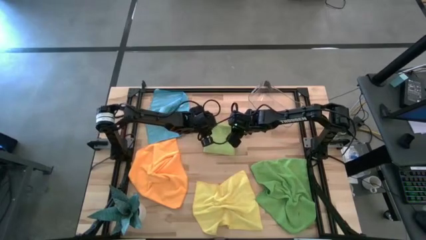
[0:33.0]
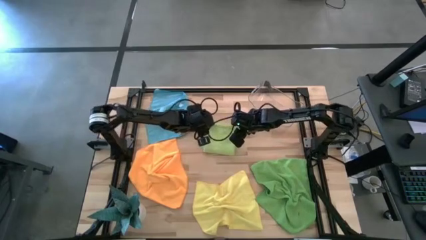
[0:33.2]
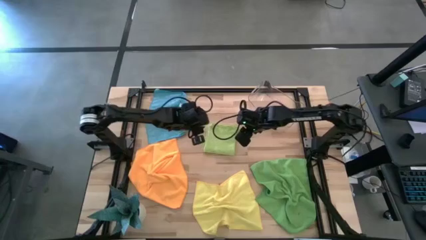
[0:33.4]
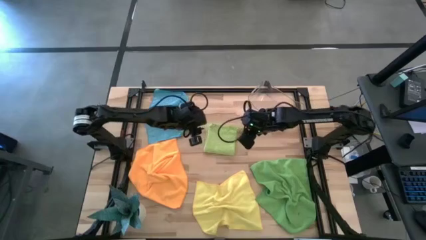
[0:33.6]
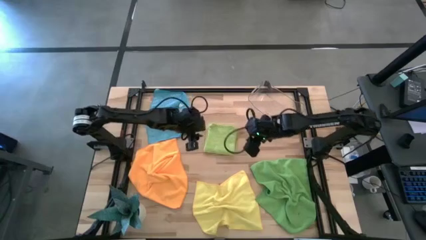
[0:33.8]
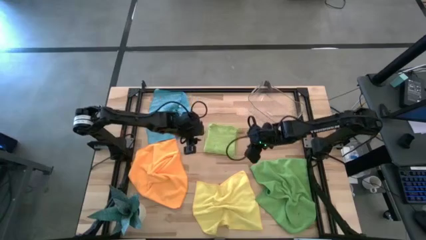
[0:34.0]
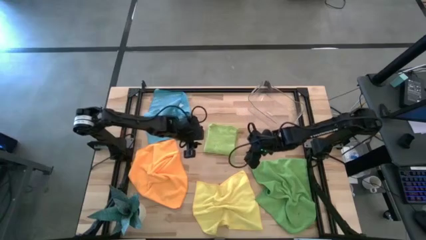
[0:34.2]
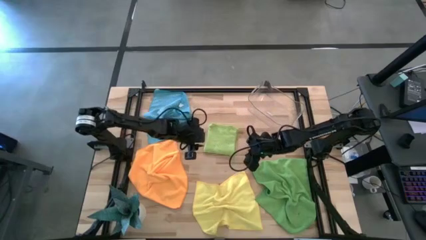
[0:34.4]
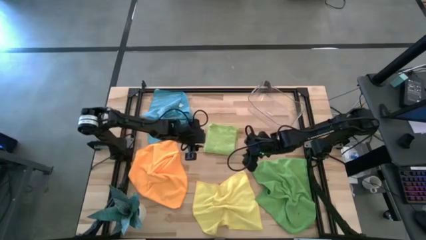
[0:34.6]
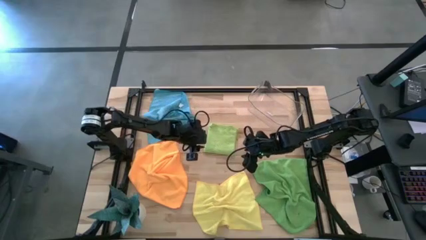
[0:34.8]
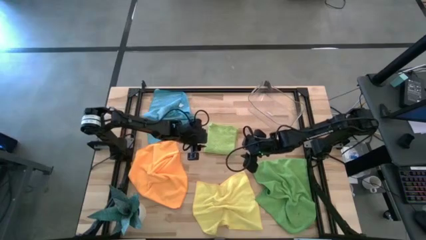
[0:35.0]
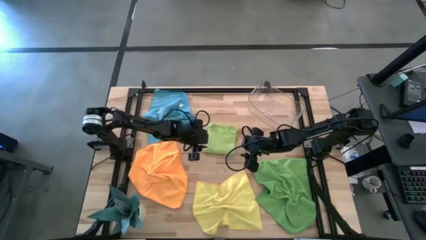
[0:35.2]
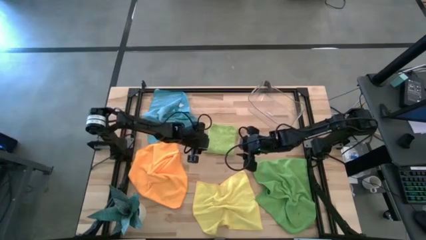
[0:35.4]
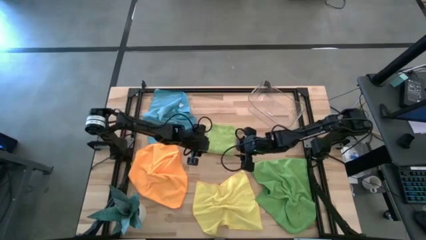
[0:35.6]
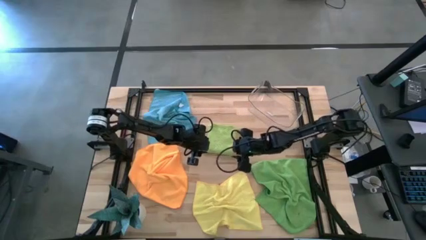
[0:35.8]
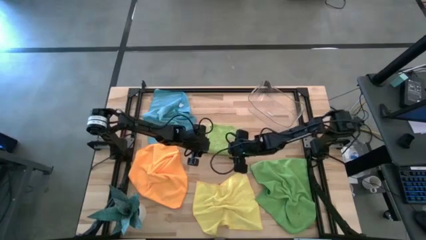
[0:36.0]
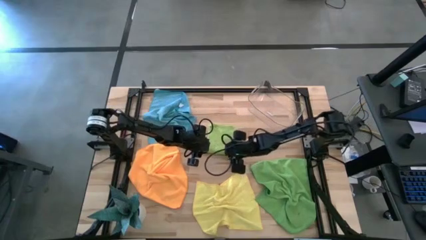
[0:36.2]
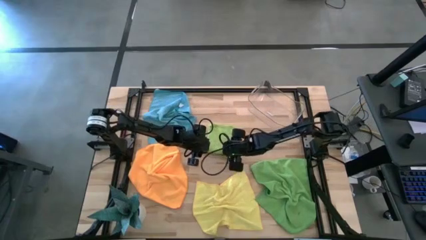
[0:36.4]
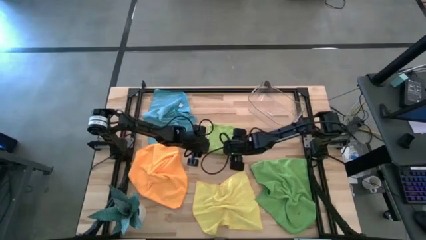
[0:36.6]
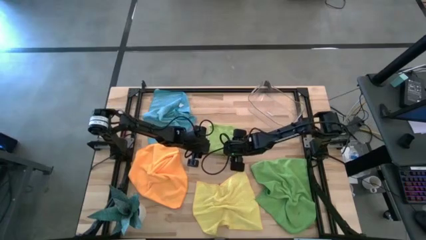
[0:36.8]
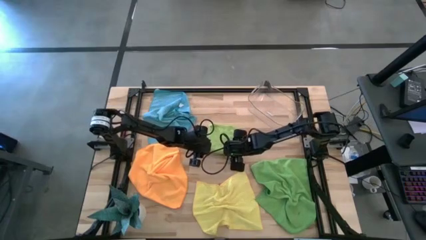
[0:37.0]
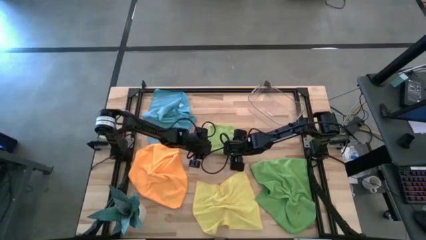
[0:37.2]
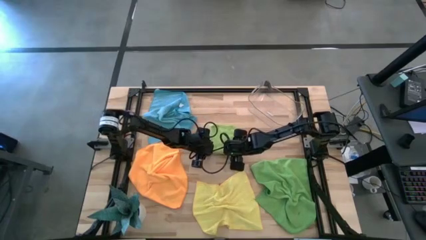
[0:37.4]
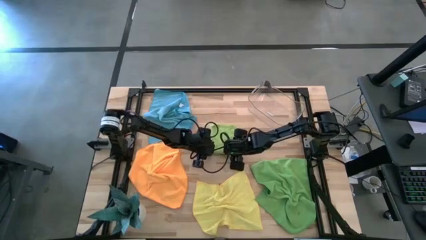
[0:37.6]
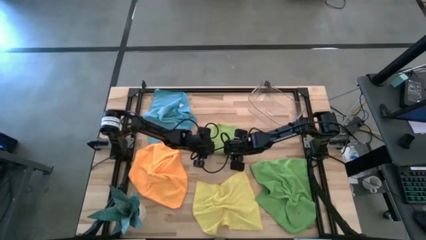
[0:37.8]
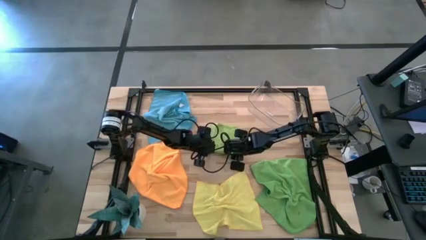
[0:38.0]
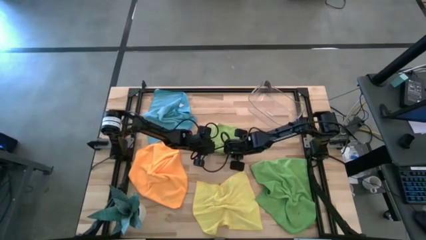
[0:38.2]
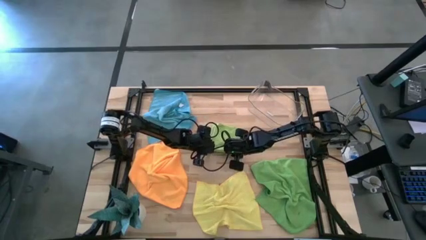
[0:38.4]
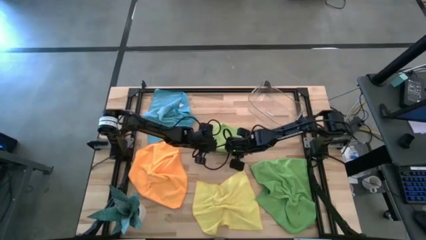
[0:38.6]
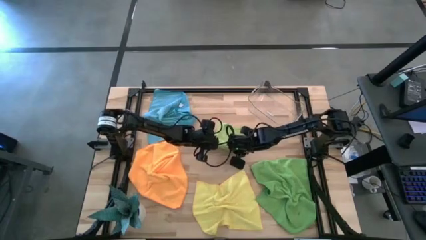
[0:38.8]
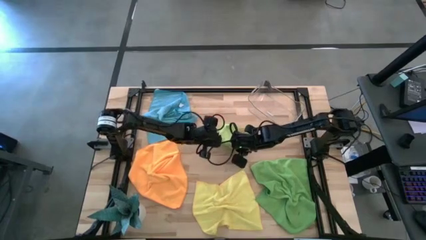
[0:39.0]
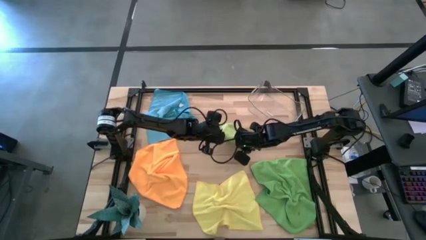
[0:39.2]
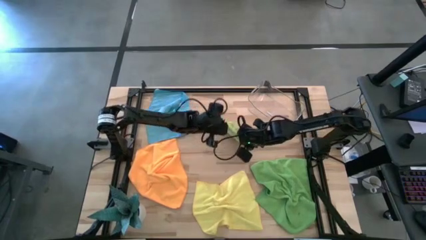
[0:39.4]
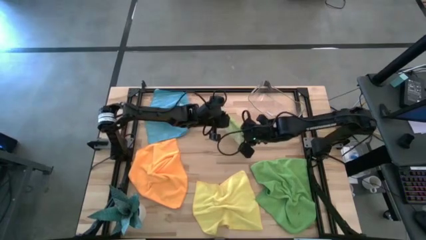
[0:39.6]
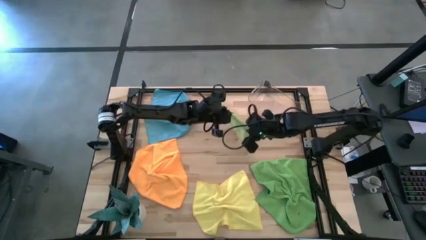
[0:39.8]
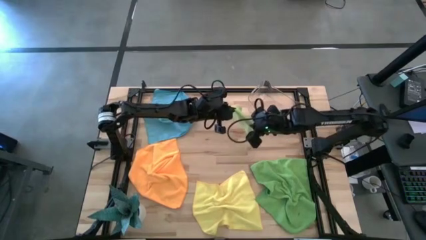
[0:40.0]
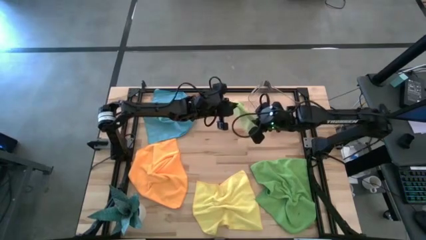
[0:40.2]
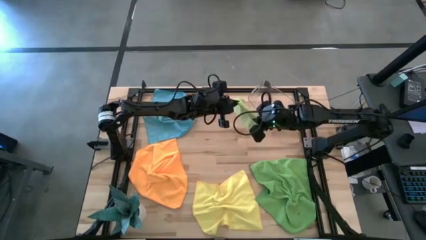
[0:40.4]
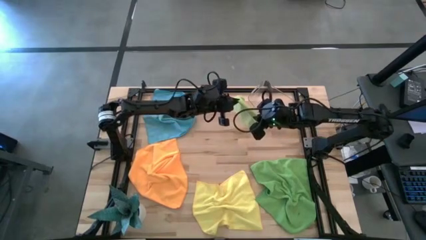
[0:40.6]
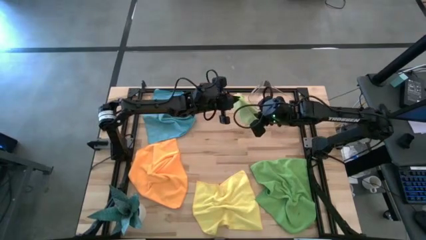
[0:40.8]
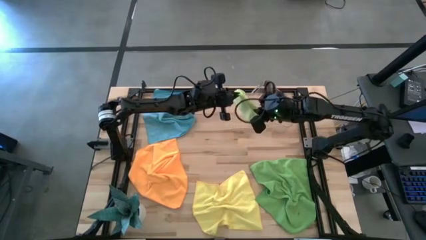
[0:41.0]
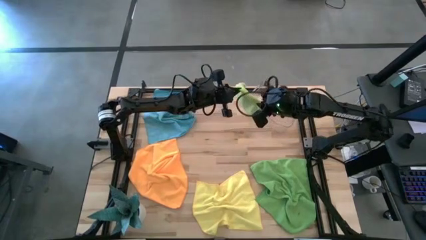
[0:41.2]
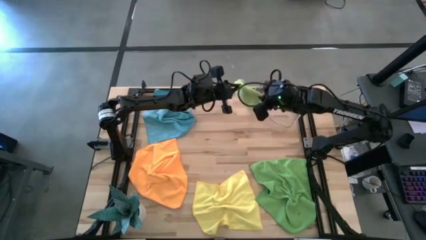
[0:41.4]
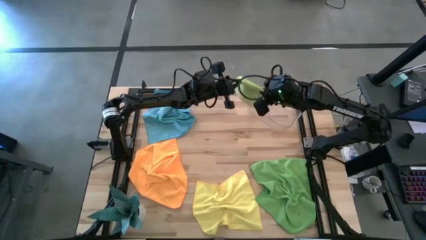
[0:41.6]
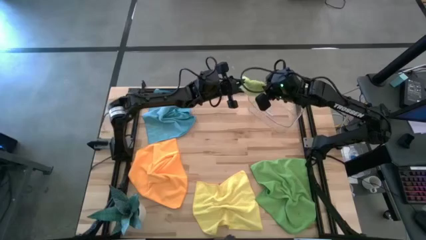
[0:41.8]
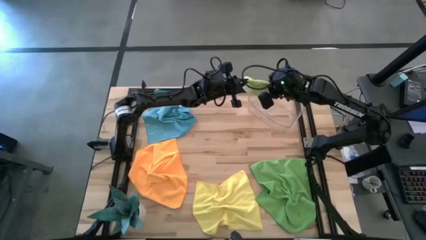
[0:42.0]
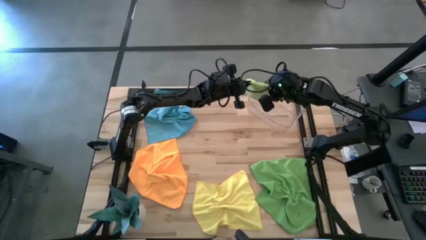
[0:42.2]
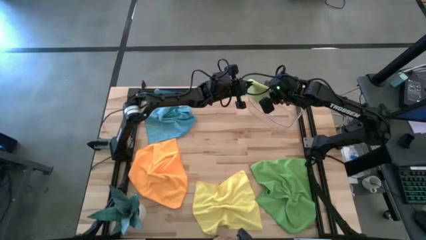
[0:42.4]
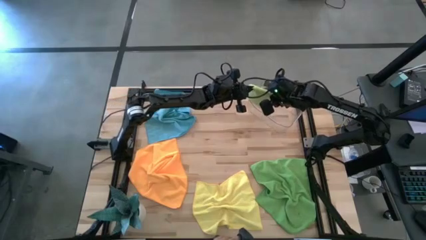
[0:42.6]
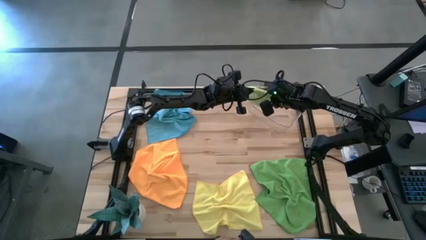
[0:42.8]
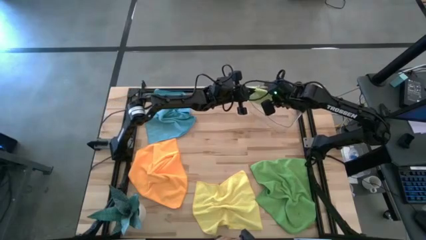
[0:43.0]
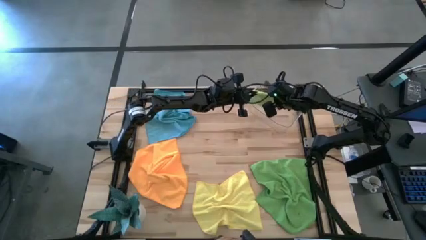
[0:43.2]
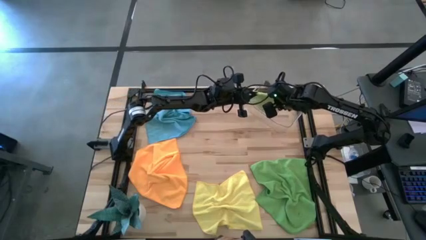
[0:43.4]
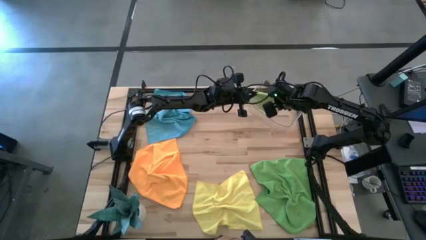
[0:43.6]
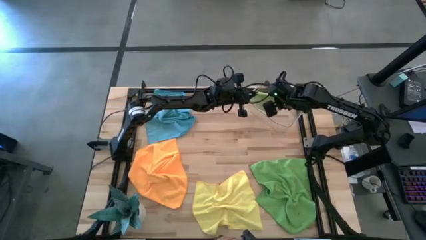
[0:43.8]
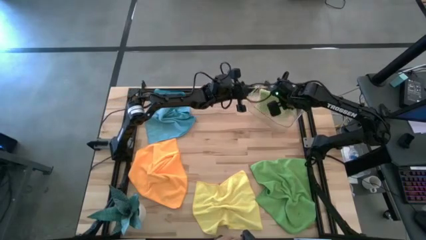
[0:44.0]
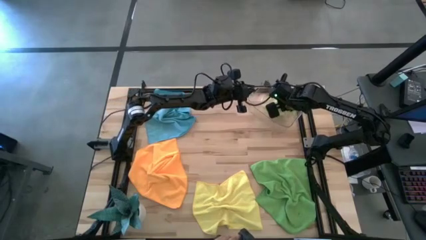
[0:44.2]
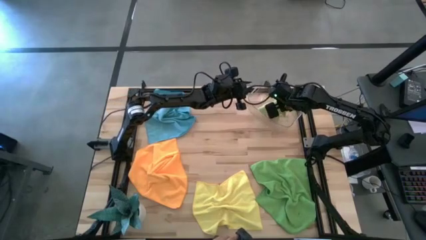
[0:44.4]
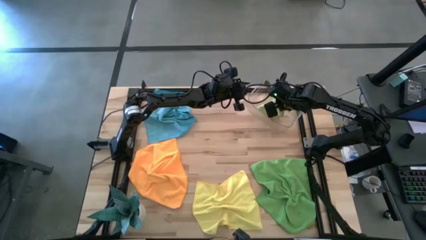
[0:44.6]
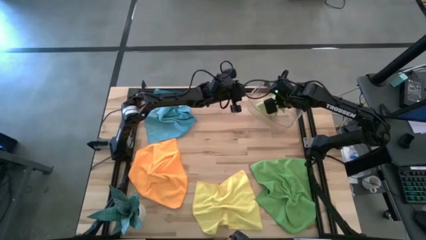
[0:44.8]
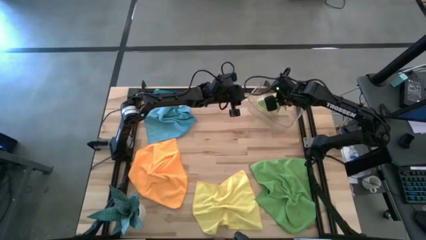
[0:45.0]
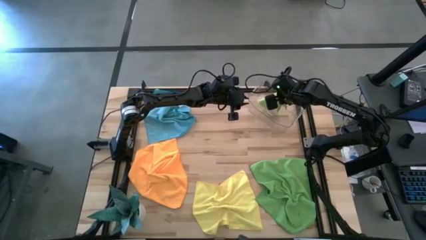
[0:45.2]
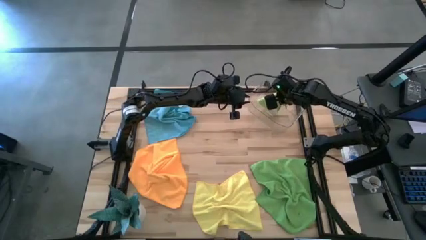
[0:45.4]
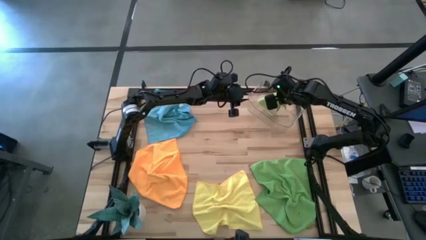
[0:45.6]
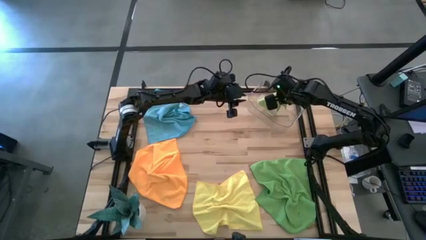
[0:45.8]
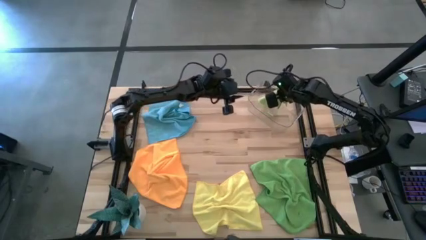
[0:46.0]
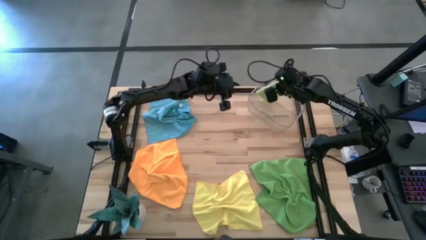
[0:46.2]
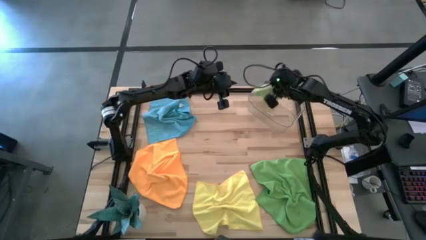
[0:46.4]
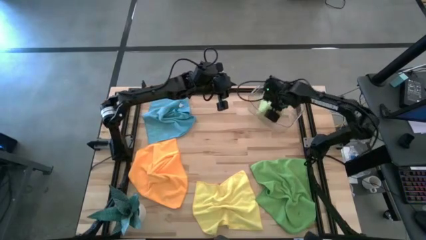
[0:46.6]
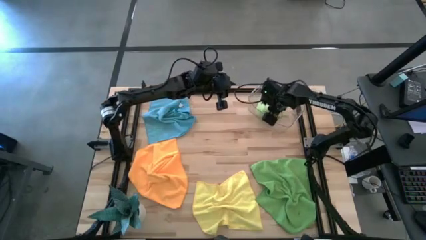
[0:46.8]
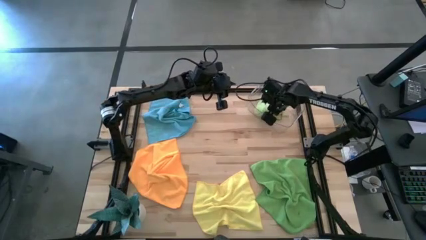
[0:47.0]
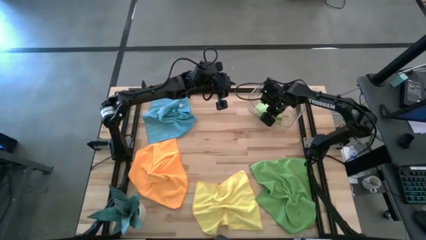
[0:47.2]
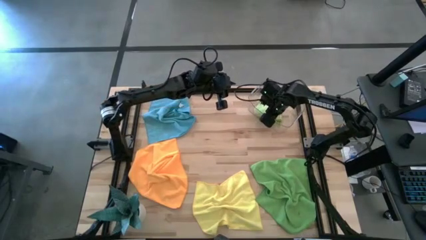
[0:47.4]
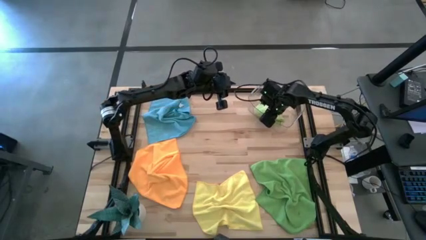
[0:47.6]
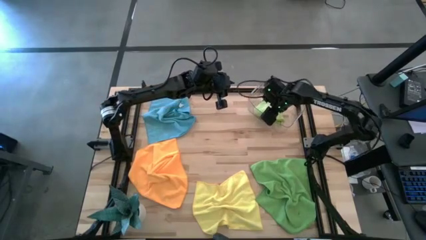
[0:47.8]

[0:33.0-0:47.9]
Task: Fold microfiber towels
Put the light green microfiber cloth into the transparent bin

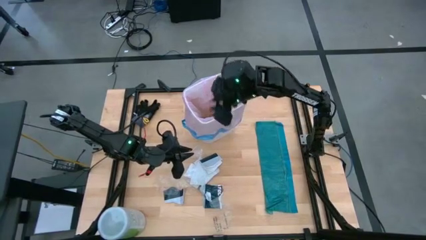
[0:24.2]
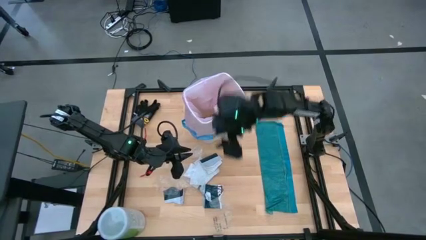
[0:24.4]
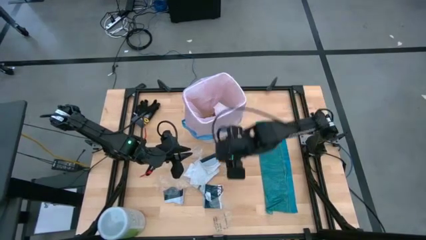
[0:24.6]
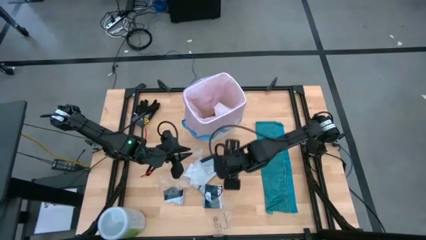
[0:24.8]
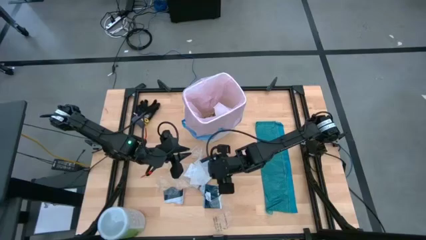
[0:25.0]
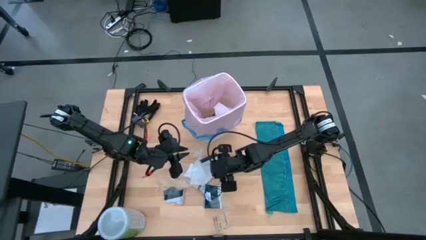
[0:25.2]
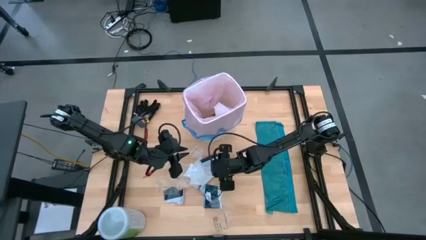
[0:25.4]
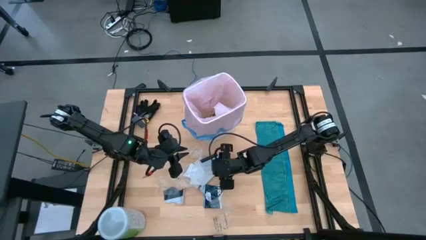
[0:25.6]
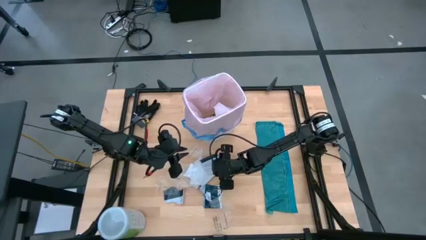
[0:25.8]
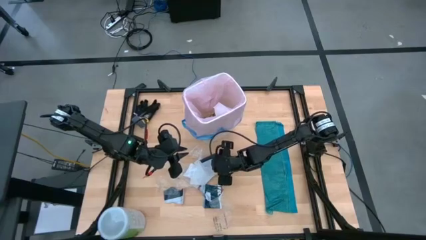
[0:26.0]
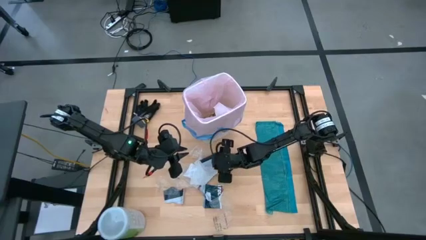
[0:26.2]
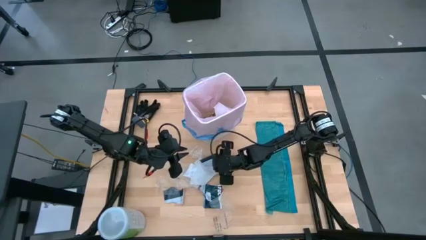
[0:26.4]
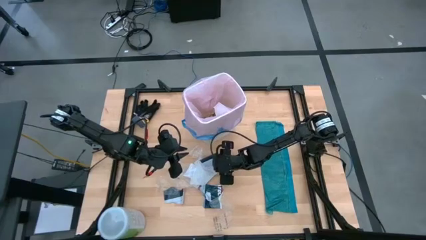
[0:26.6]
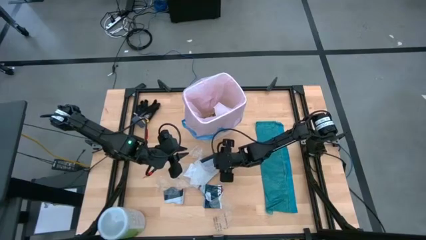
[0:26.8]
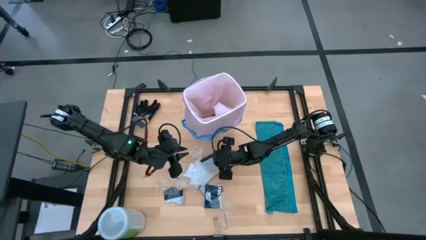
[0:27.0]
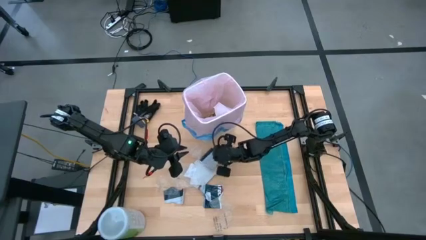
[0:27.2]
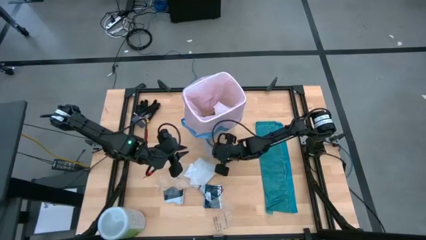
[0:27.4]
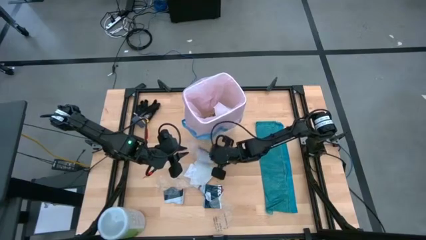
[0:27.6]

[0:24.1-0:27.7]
Task: place trash/remove bag and relplace
Put the black-white paper trash into the white trash bin
